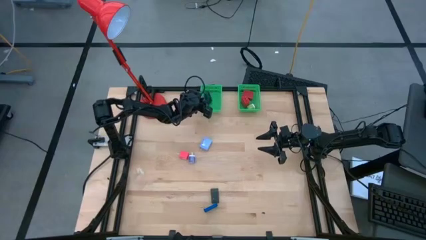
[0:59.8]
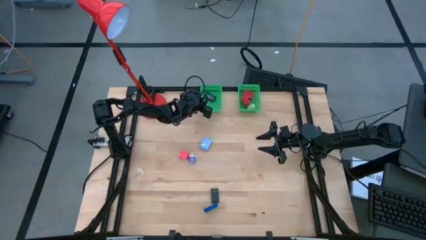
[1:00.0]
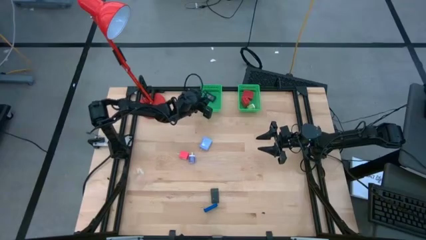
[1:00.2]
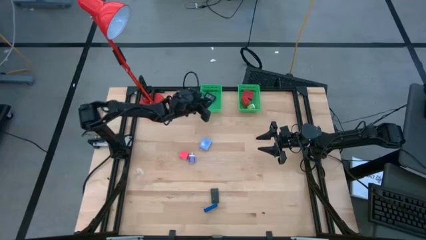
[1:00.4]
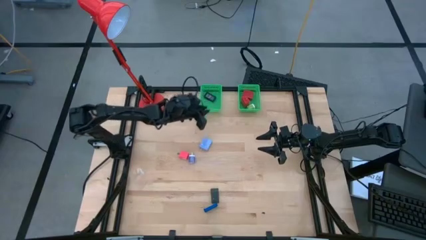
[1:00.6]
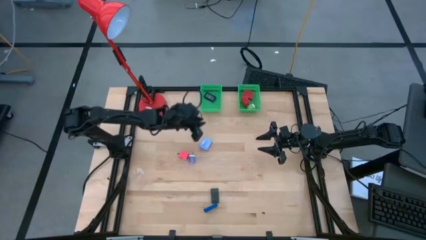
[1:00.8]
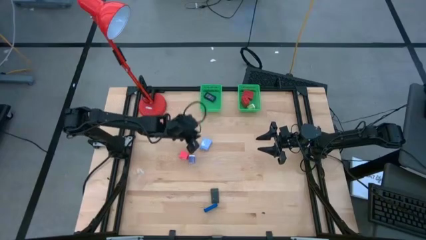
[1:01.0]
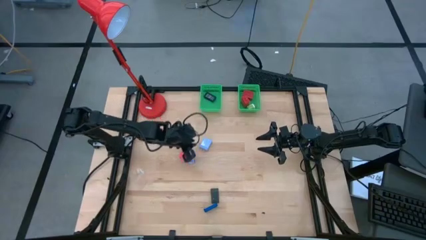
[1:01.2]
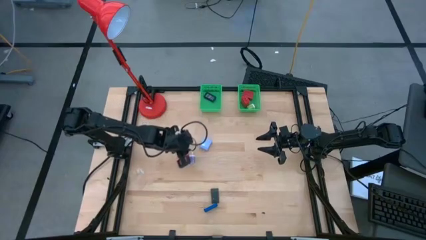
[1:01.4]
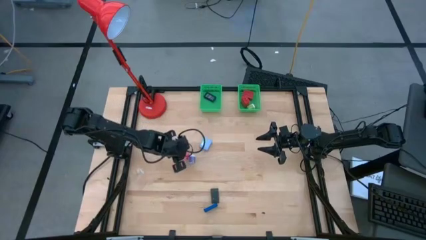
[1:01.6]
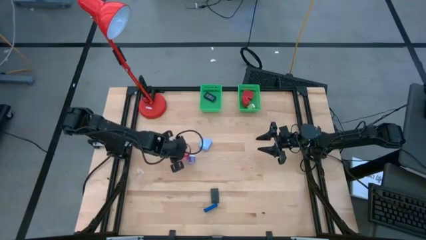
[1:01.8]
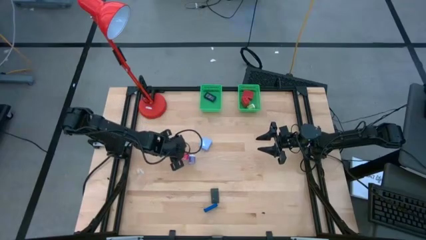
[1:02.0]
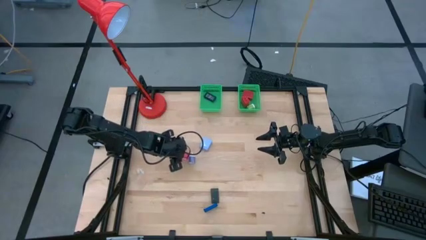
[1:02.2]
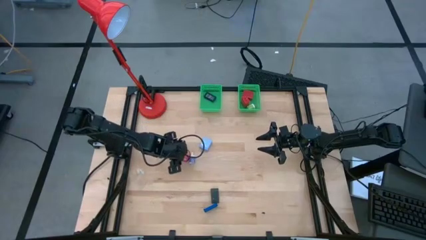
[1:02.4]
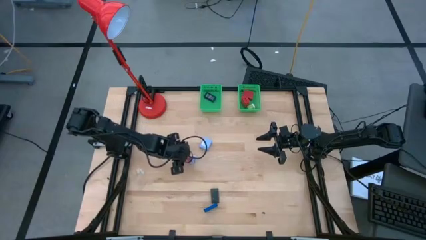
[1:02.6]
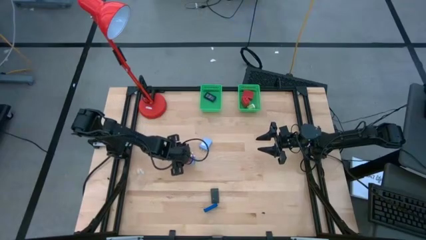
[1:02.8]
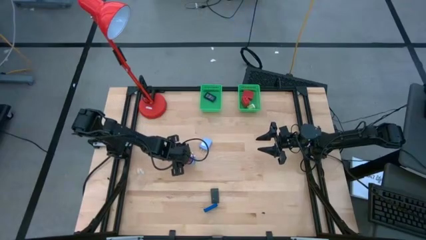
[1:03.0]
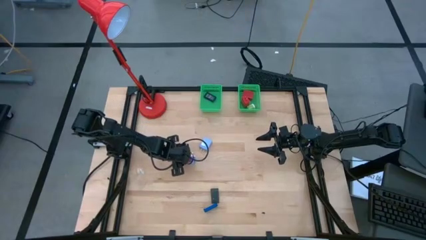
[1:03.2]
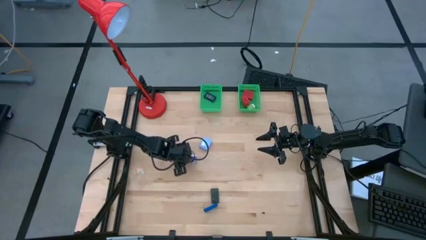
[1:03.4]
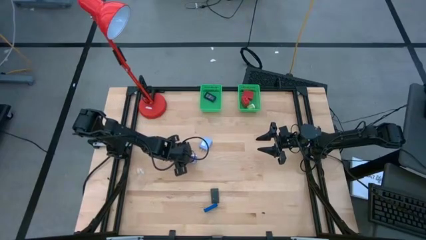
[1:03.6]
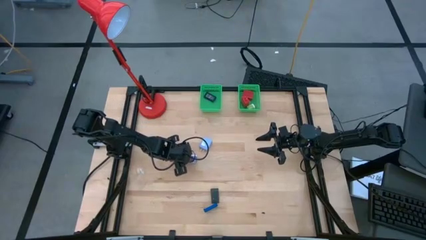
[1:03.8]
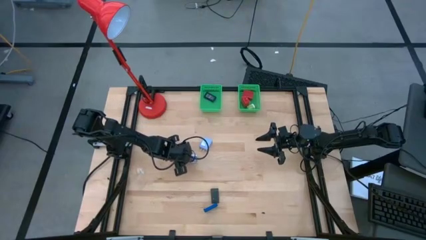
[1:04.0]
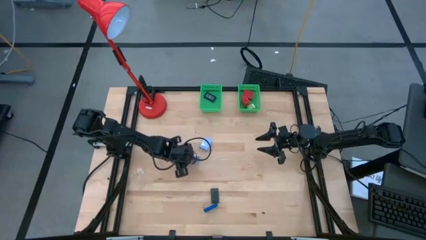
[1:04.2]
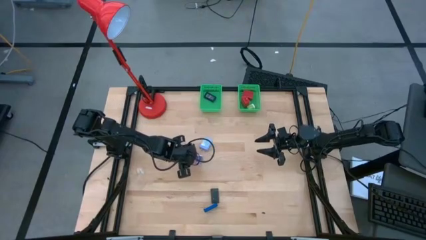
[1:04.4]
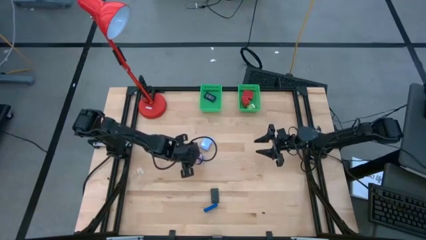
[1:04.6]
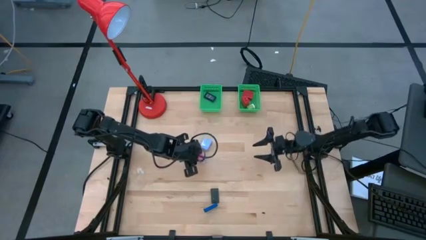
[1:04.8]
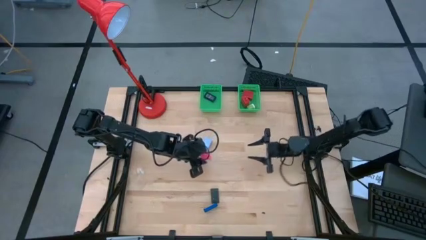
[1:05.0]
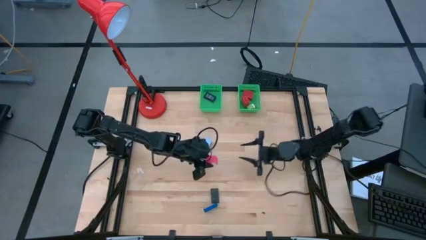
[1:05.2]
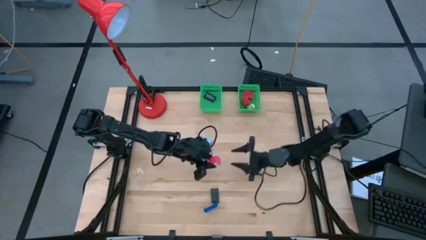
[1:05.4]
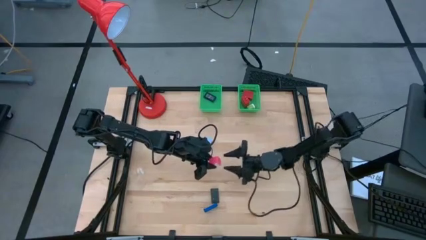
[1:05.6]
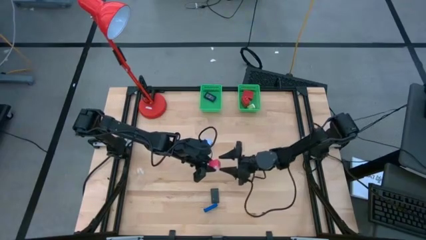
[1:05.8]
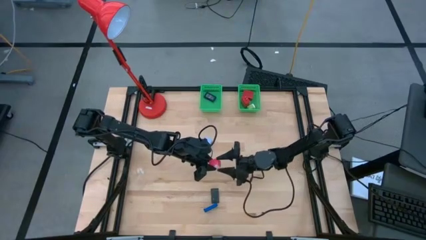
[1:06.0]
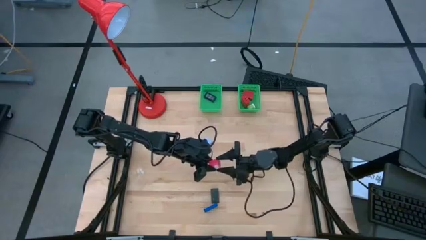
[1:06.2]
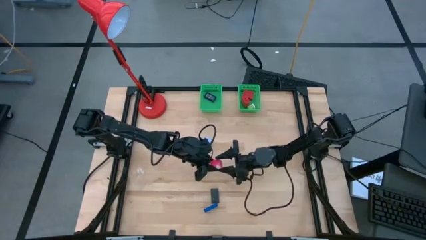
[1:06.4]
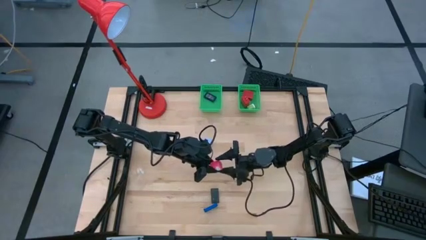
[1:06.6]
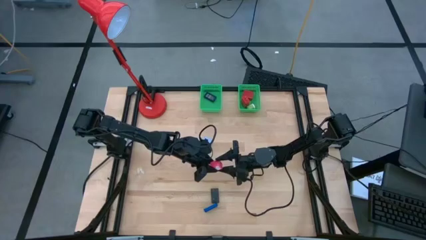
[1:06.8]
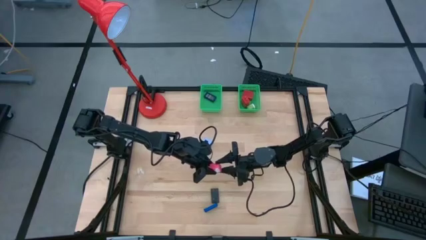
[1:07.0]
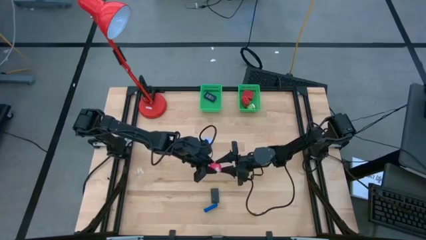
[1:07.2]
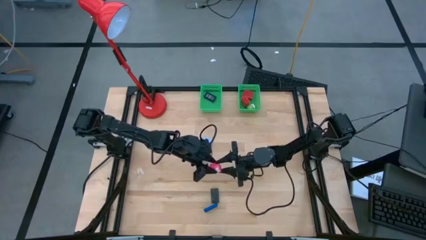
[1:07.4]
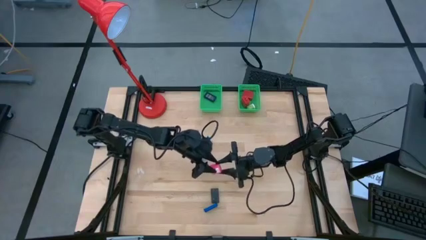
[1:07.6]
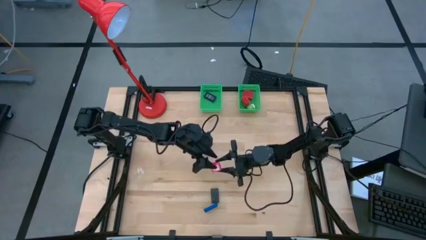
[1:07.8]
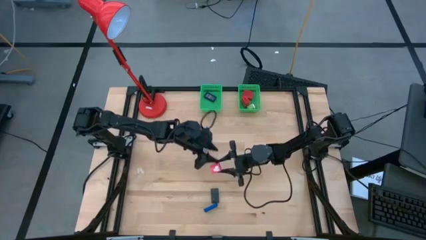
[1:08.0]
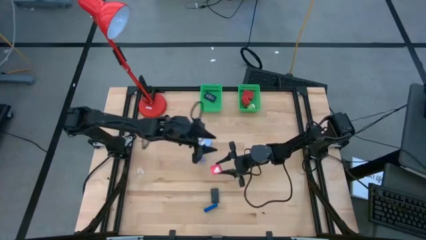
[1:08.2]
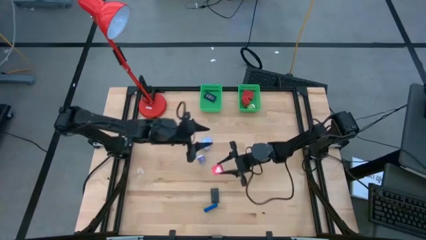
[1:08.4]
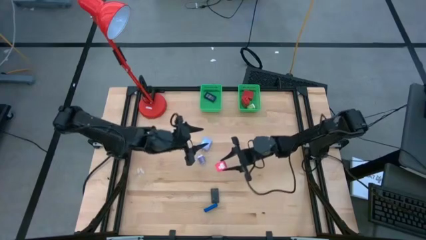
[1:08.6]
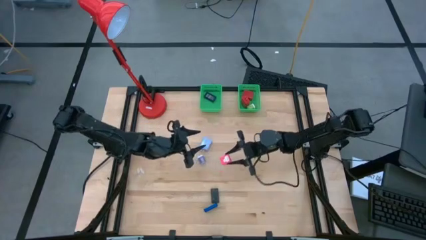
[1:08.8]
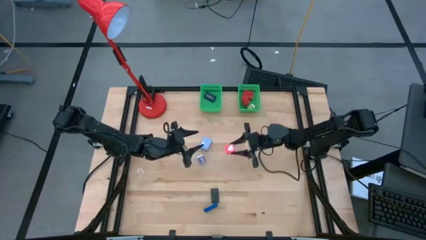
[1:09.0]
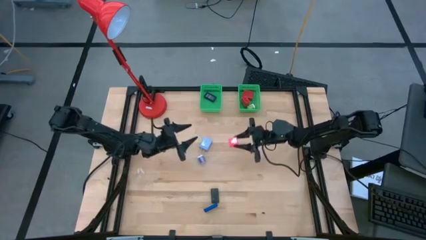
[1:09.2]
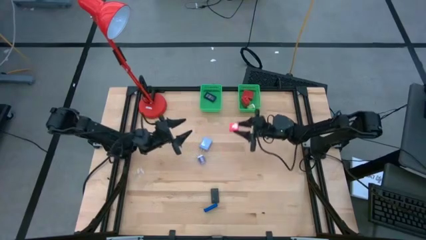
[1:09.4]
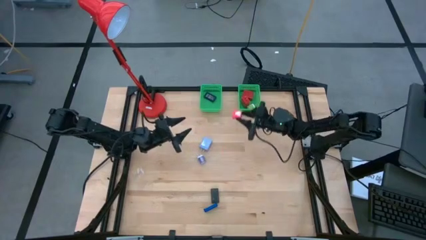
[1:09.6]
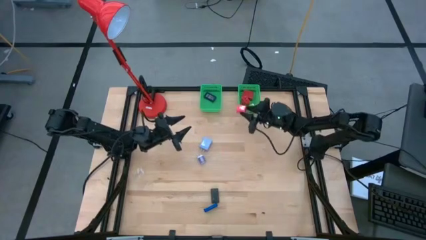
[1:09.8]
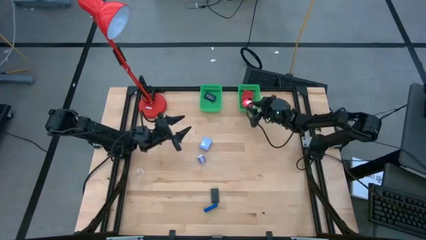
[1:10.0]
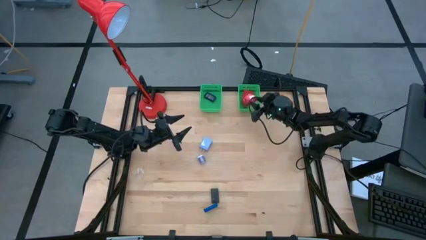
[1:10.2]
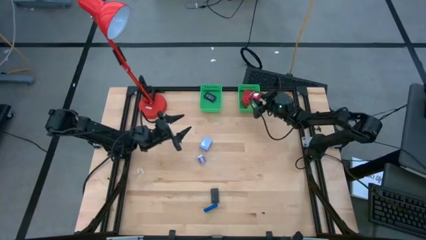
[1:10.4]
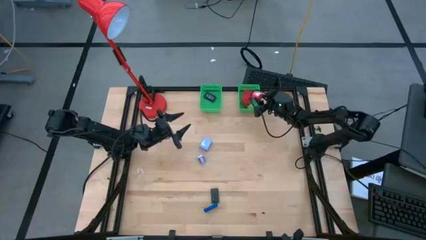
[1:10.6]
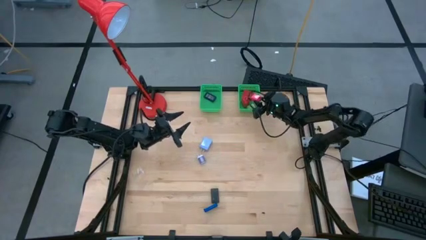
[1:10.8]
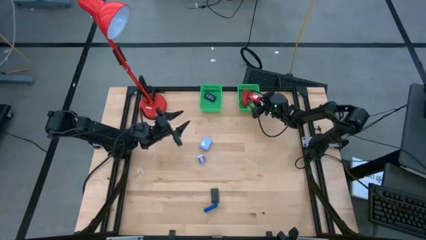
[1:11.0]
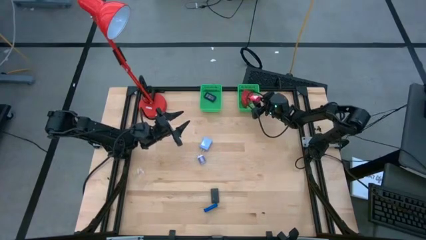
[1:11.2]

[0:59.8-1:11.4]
Task: Pick & Place Office items
Put the pink charger adapter into the right green basket

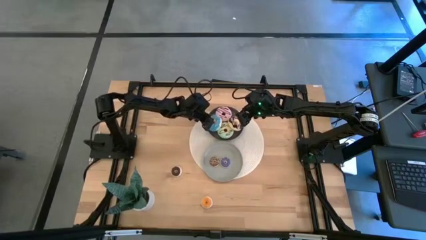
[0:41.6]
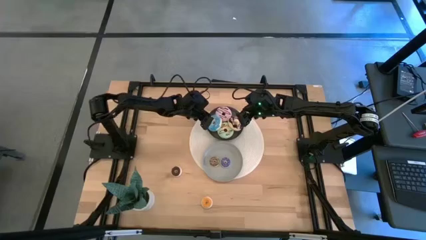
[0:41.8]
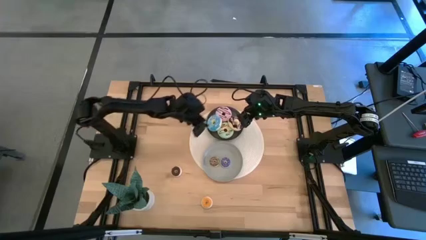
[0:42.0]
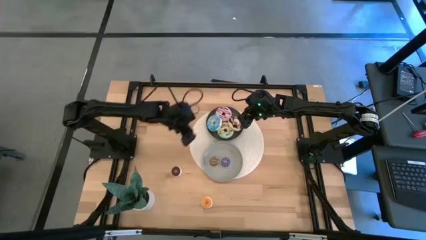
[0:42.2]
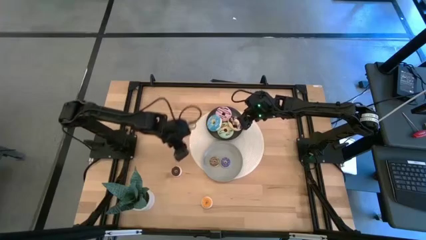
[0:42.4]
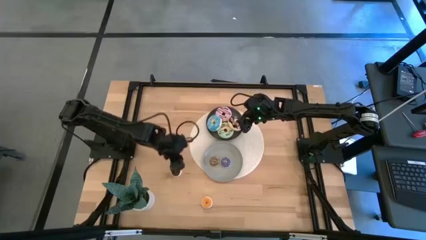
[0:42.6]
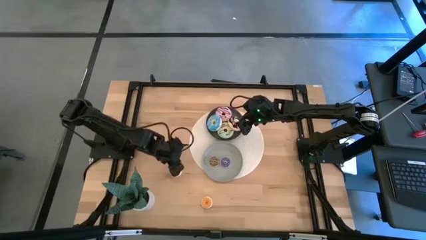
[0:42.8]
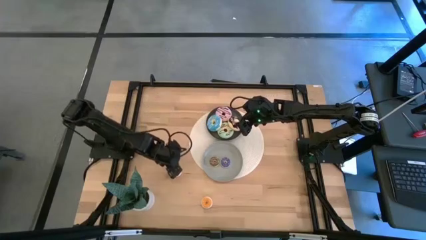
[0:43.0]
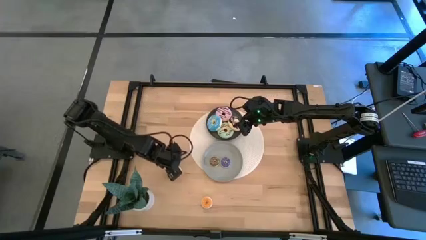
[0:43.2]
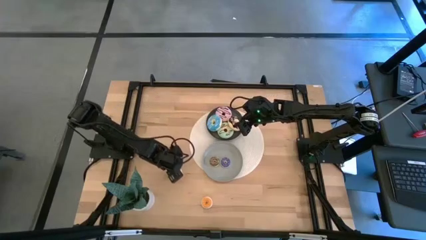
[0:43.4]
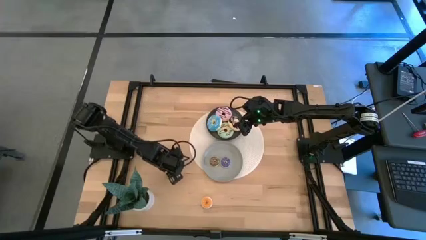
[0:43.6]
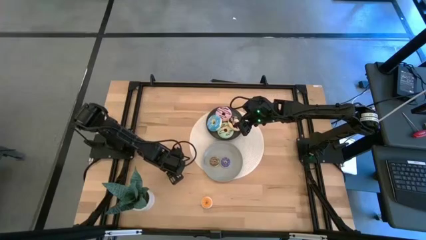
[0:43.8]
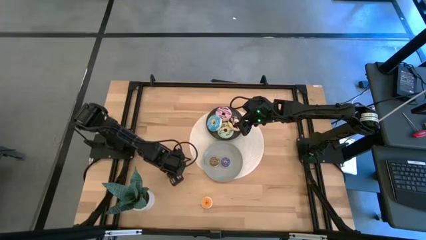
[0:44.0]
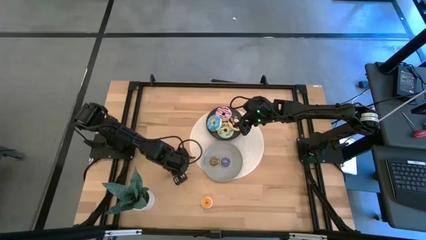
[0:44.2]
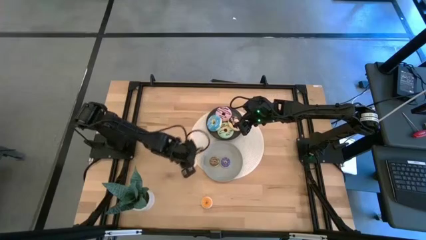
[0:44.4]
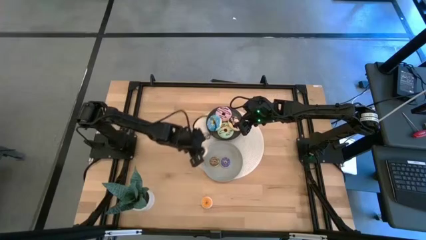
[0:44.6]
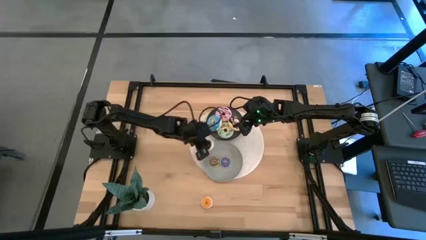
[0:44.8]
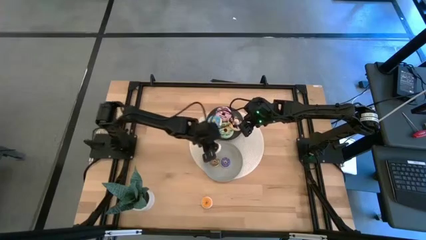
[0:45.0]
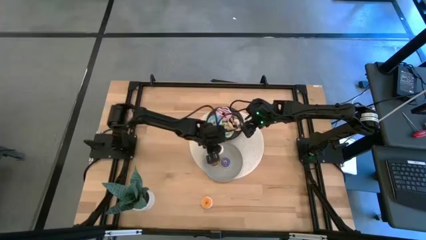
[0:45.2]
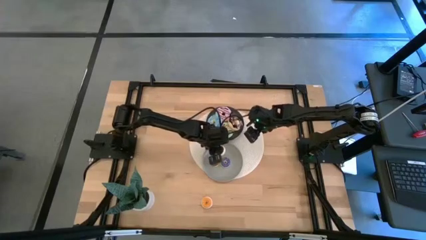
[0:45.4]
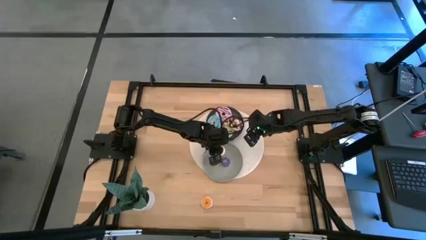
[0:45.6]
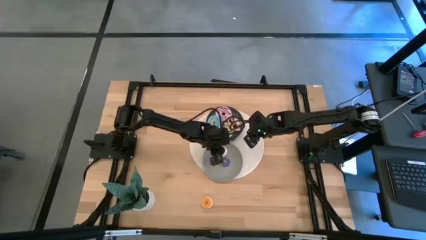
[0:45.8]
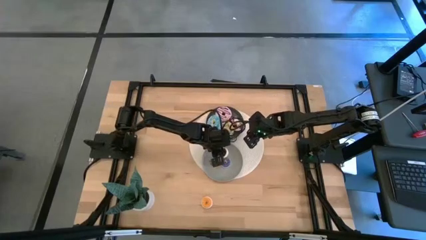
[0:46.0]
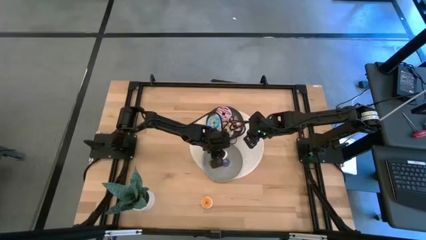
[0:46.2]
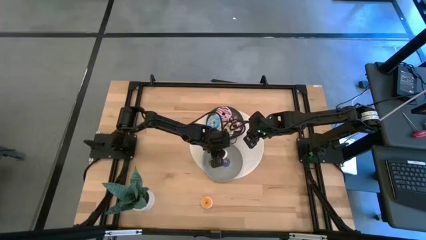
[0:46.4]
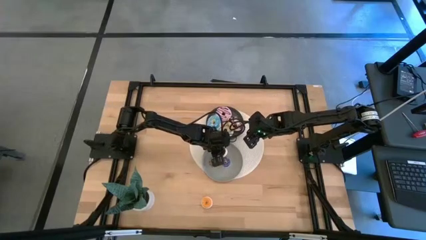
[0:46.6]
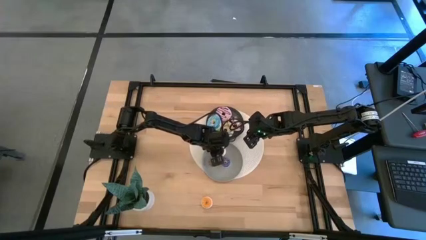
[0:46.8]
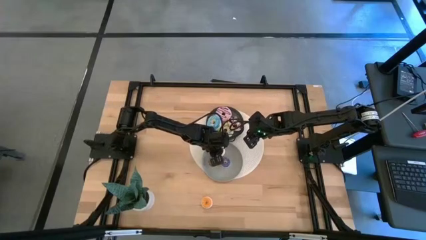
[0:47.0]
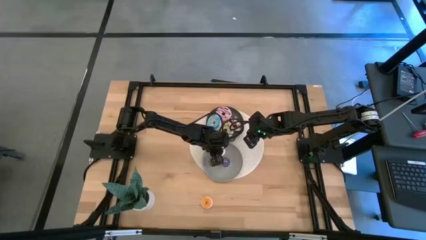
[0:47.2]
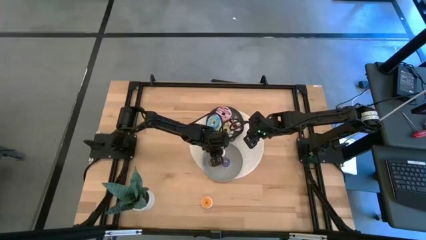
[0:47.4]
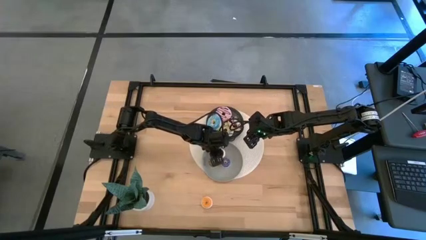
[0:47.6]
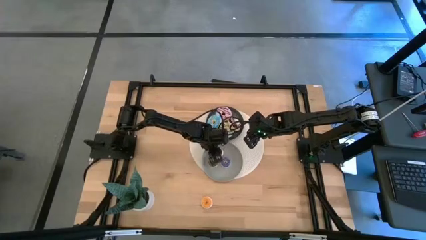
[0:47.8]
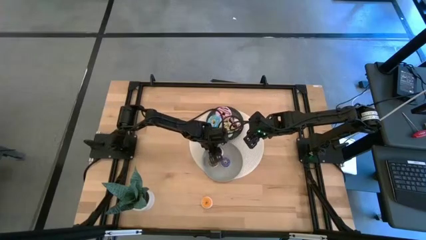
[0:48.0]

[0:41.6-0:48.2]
Task: Pick & Place donuts
Put the small black donut on the gray plate
